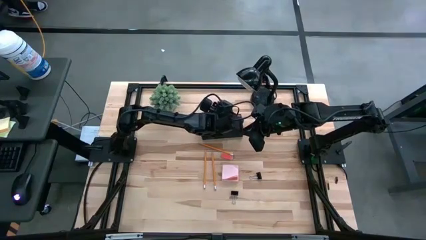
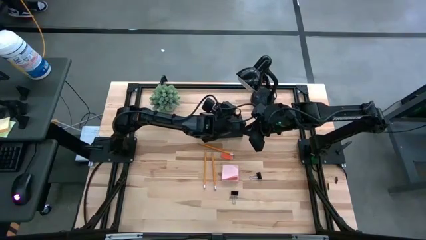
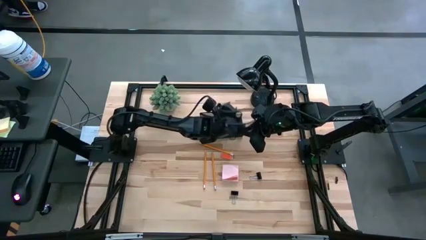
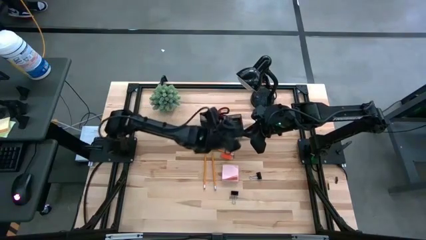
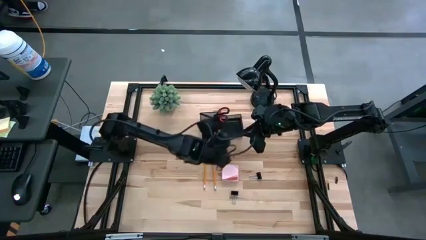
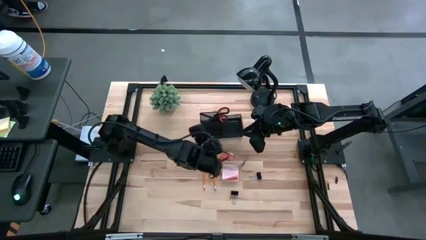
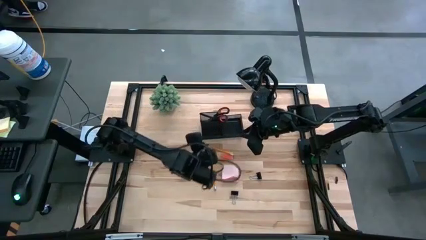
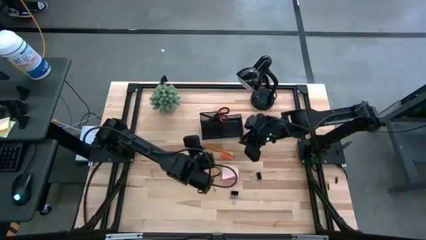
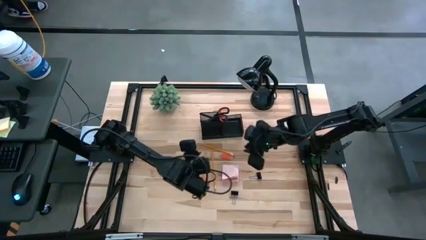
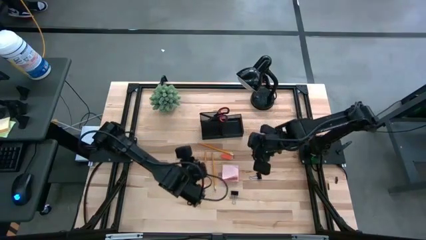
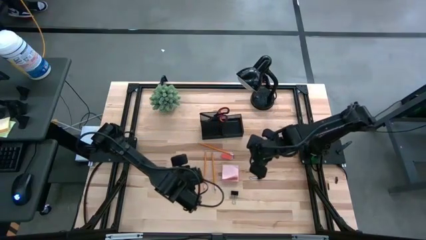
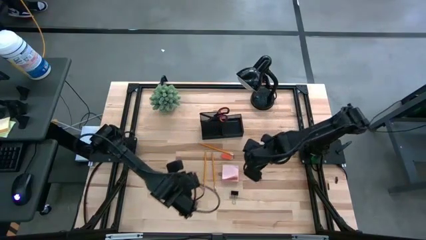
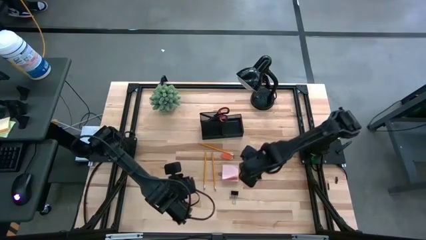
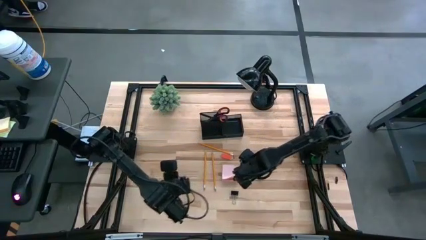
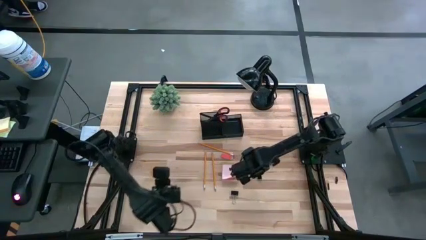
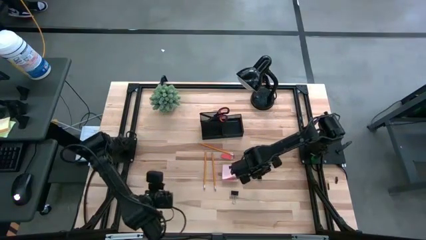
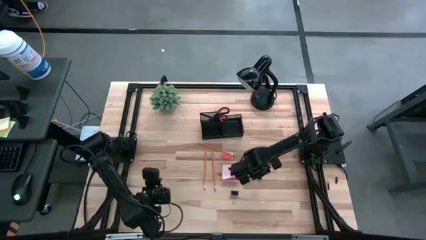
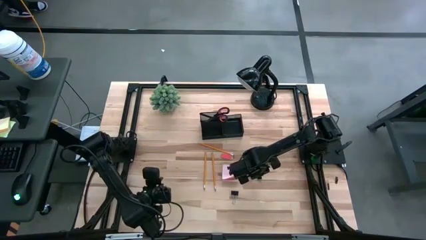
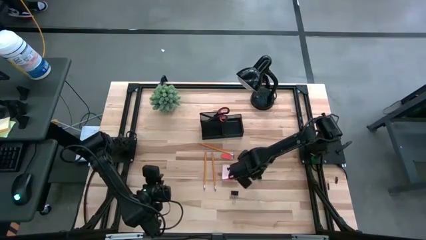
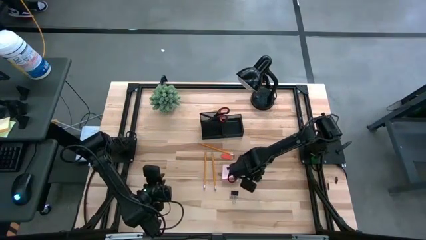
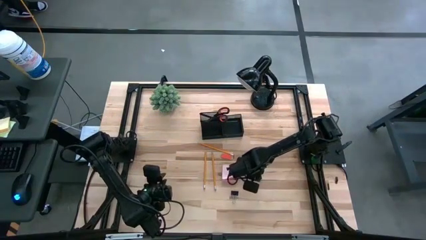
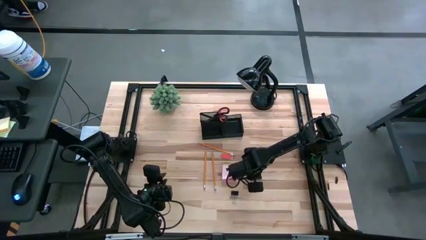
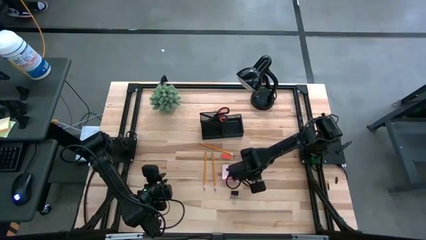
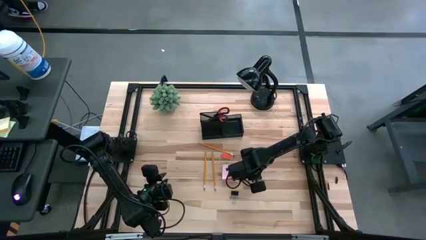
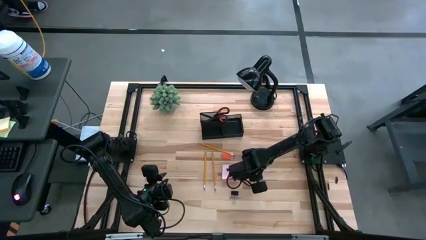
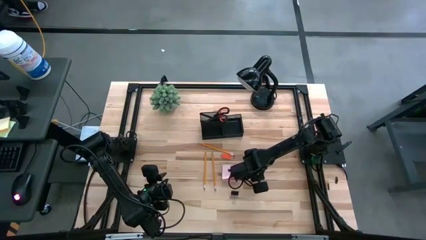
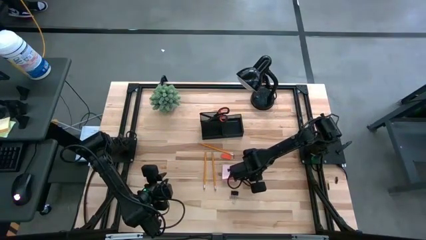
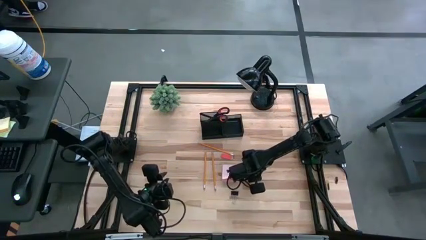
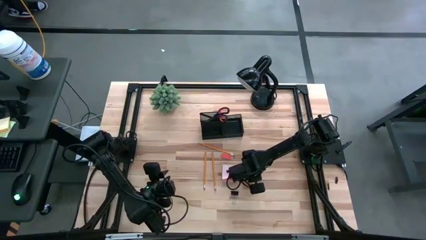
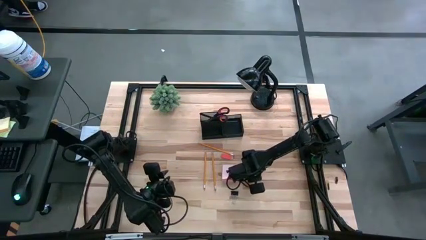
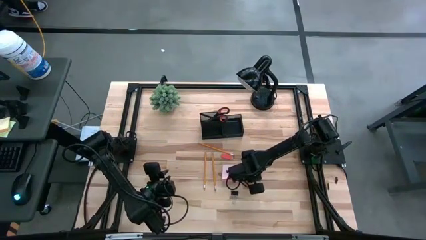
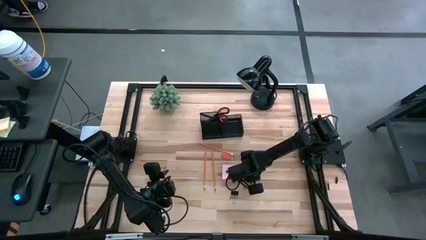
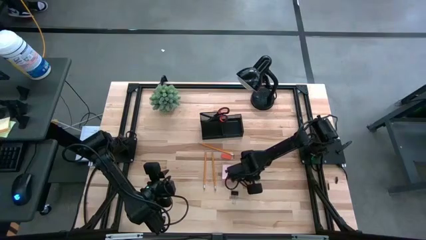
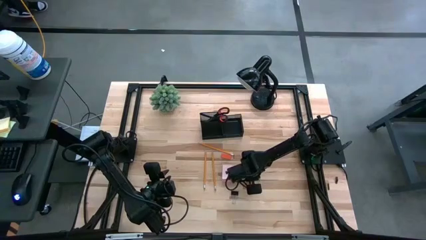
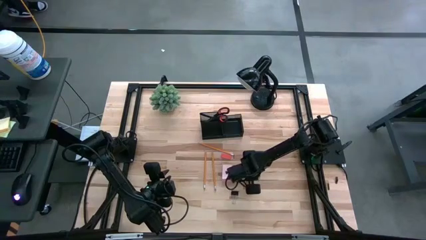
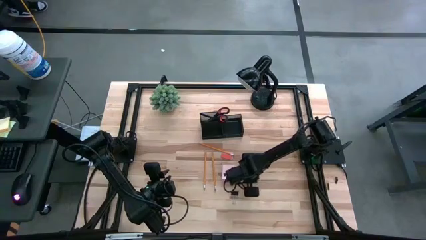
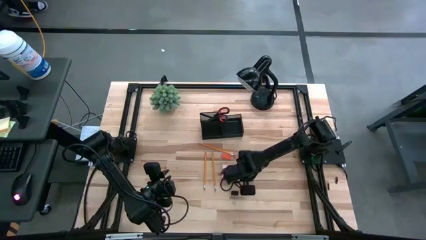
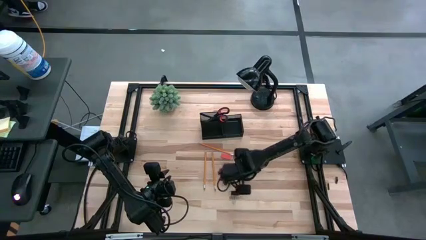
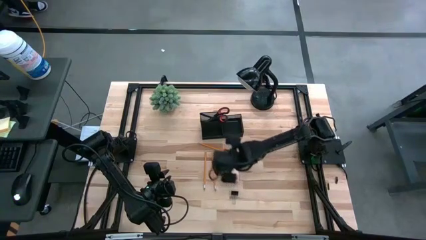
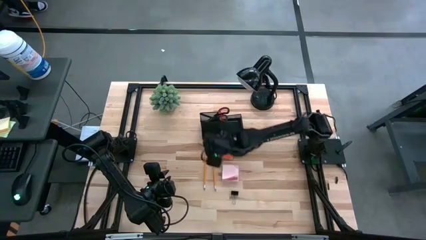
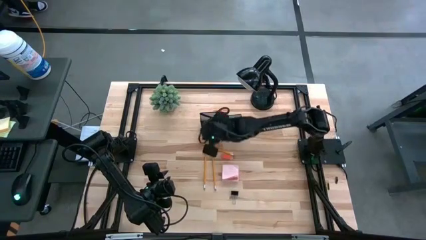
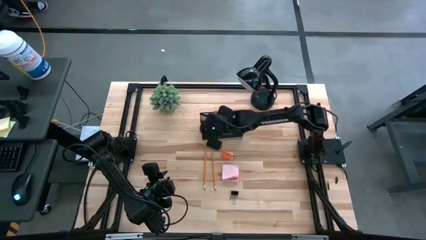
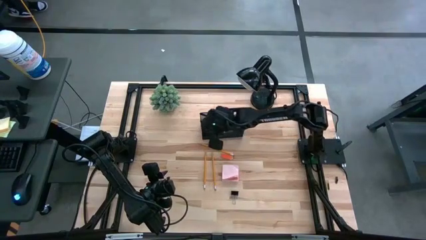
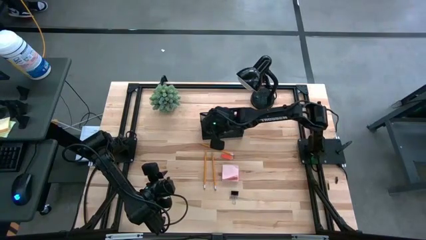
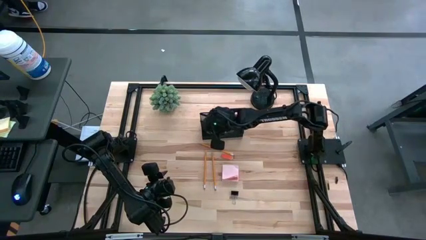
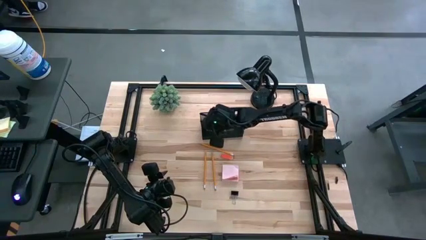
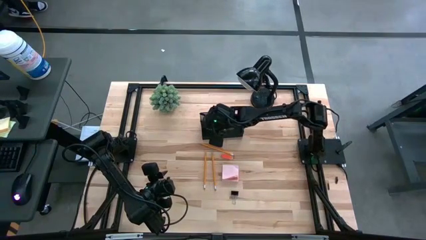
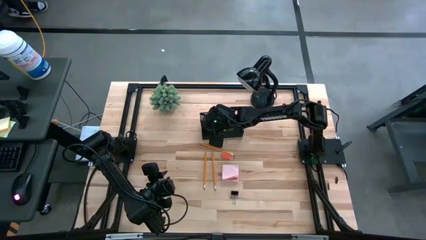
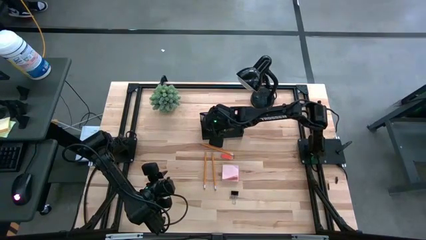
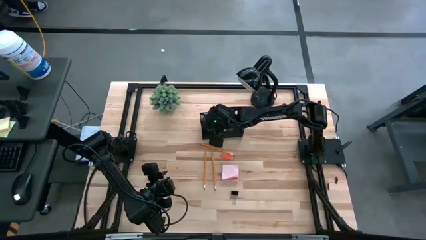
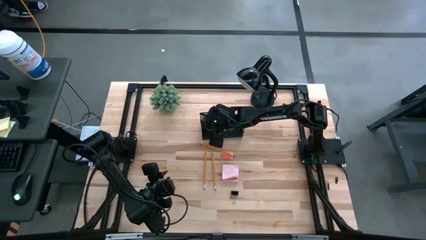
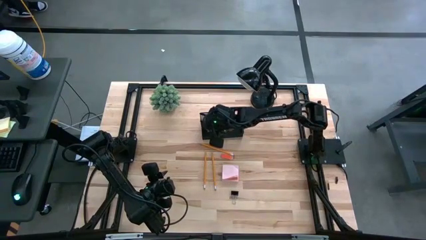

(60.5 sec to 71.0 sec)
Task: Pick and place office supplies into organizer
Put the top binder clip into the desk organizer

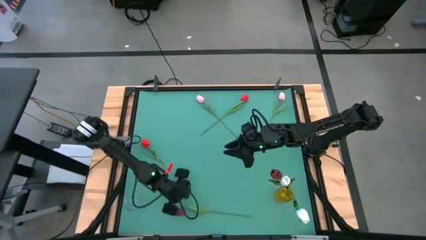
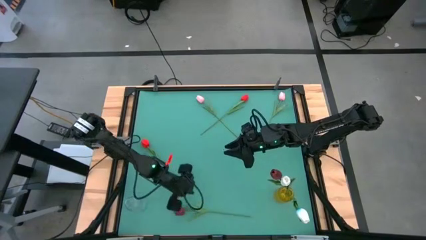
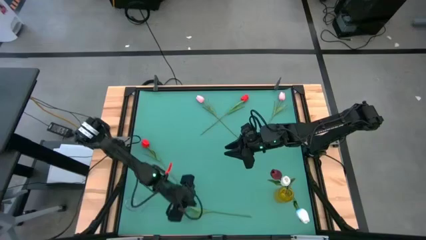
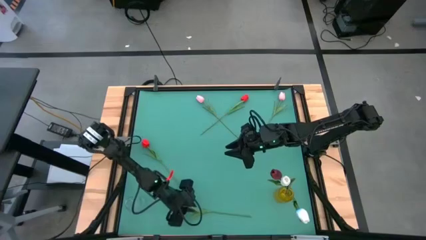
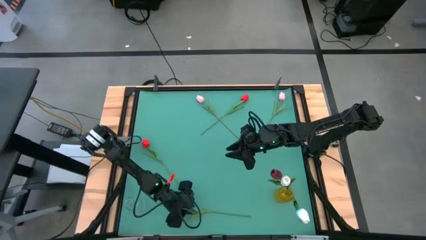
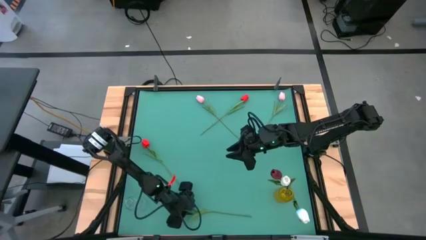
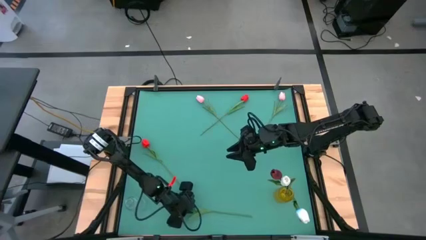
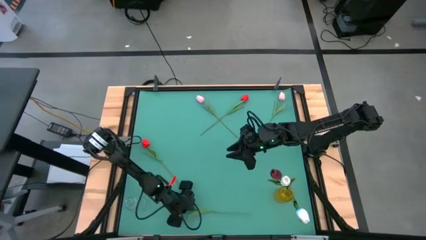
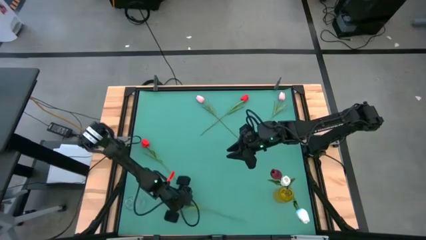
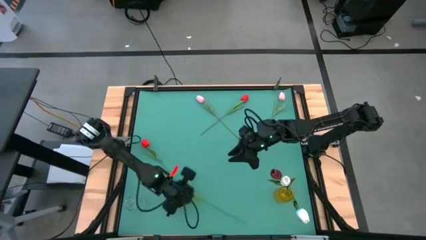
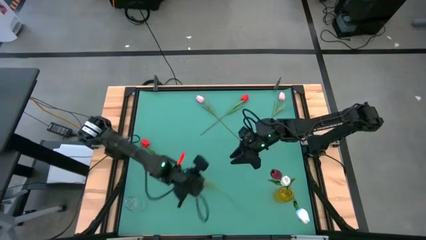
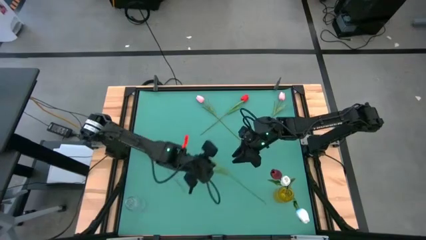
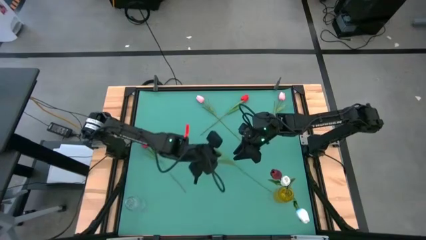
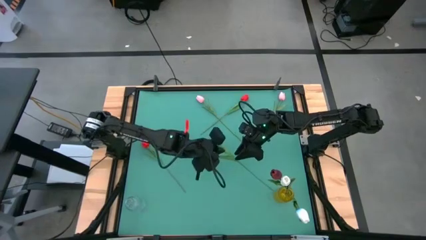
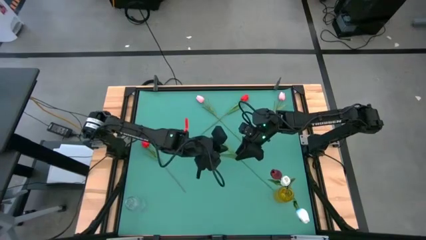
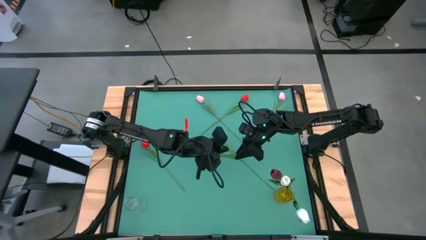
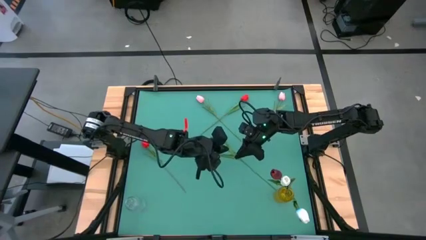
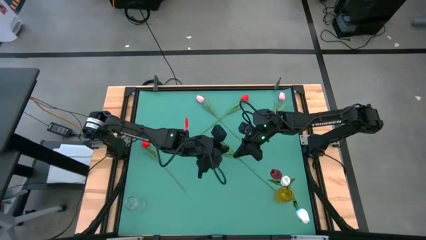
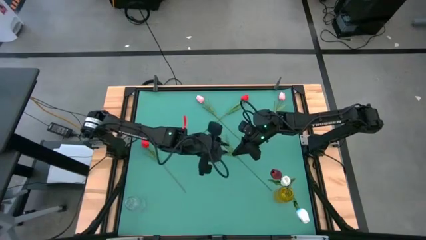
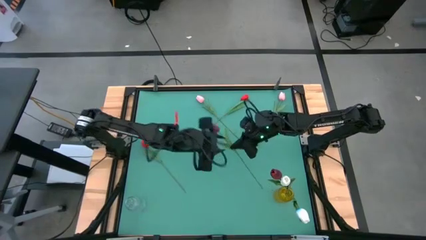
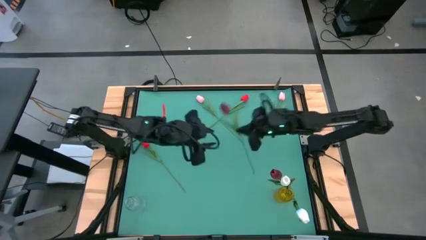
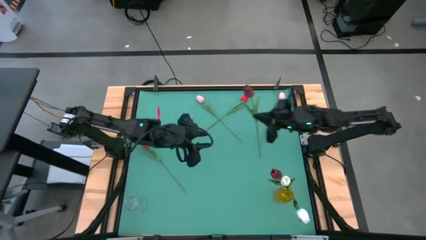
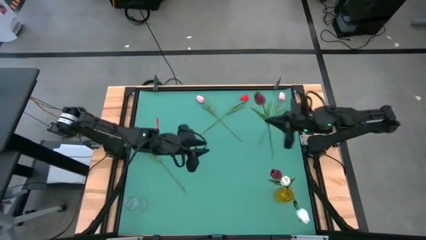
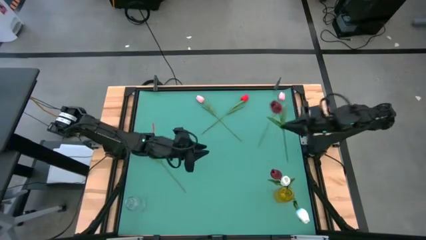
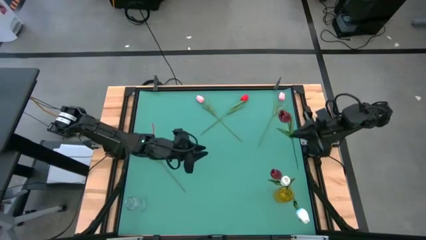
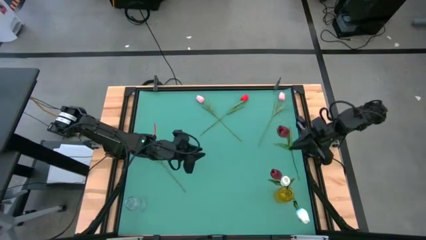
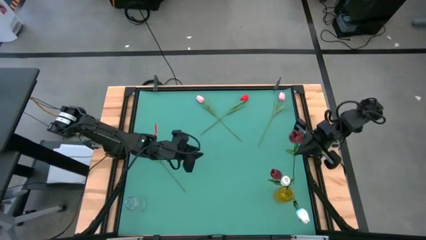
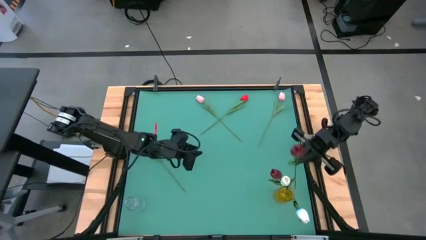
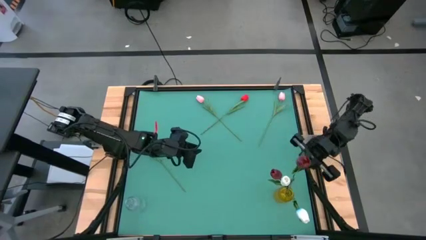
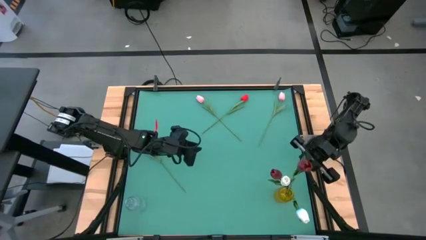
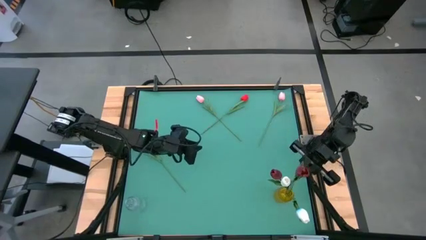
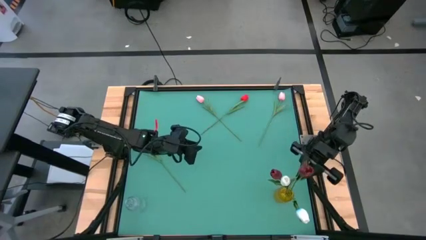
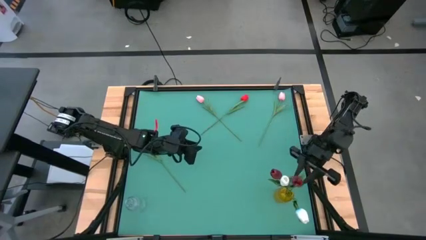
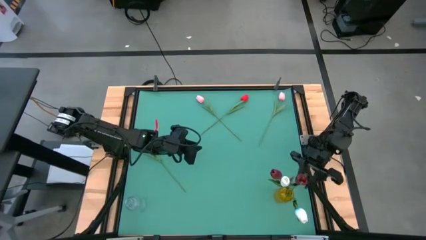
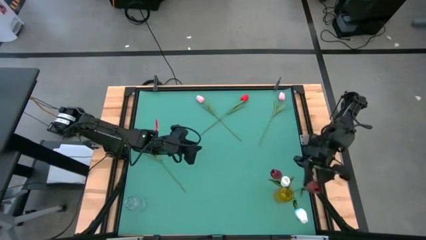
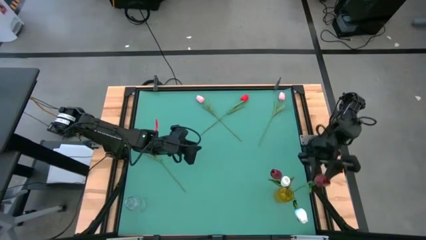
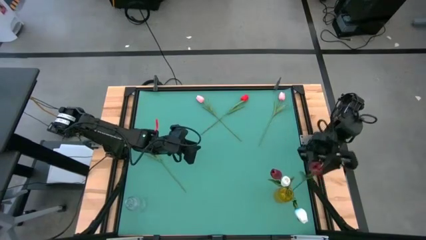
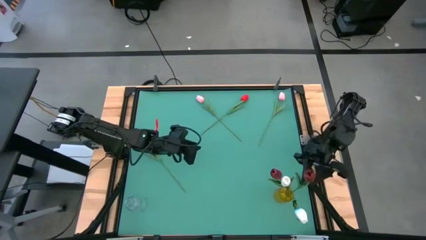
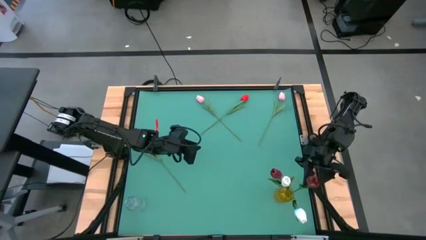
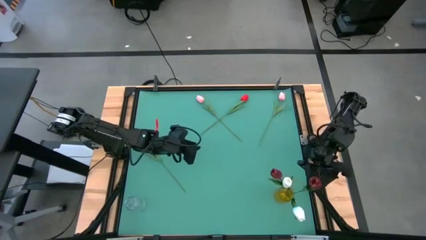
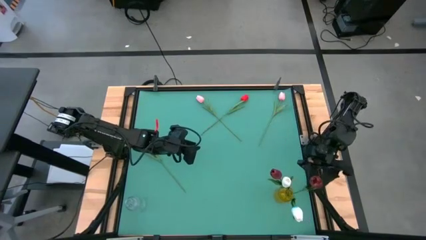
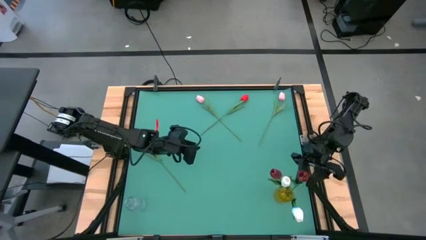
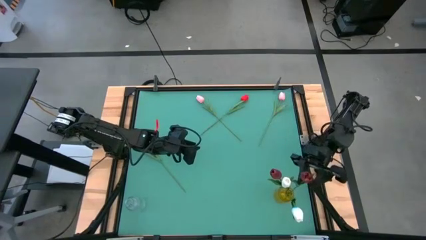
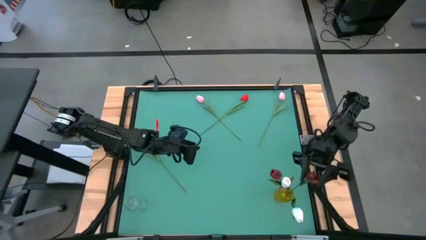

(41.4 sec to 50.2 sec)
Task: Sort flowers into vase by color
Put the dark red tulip into the yellow flower vase
